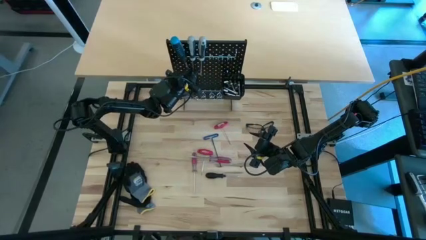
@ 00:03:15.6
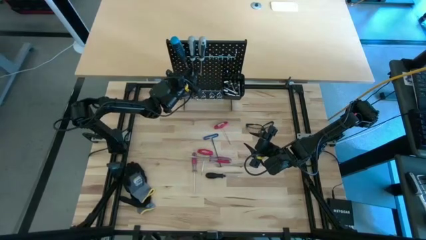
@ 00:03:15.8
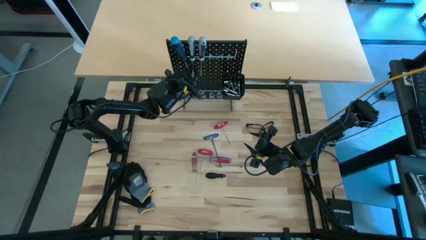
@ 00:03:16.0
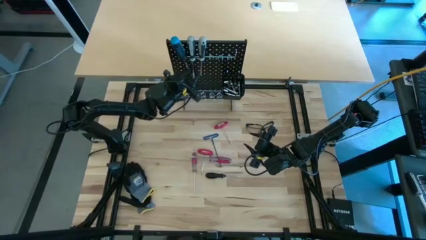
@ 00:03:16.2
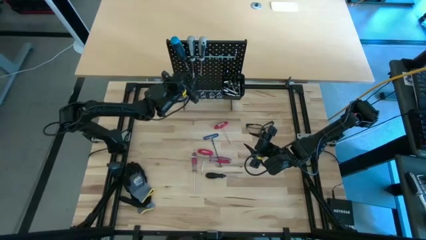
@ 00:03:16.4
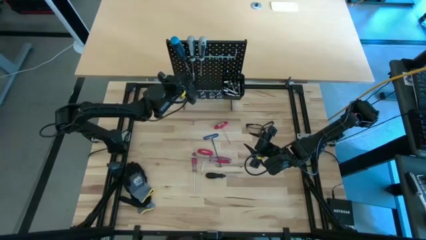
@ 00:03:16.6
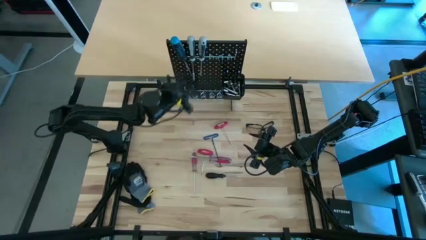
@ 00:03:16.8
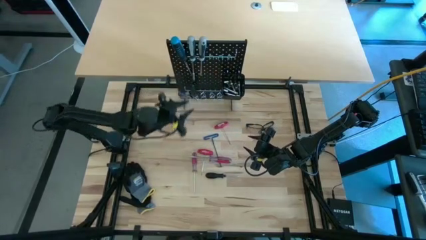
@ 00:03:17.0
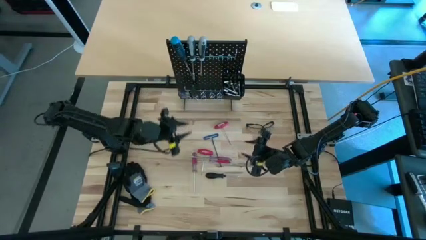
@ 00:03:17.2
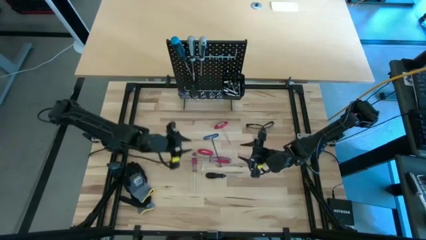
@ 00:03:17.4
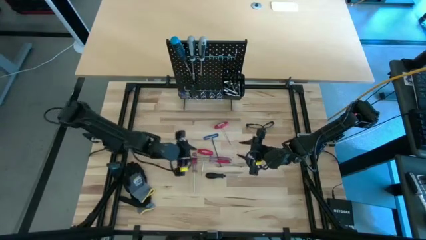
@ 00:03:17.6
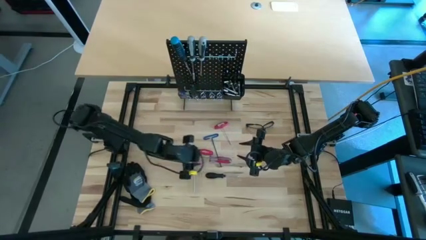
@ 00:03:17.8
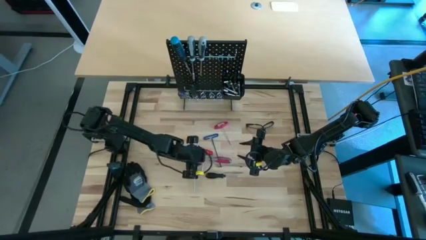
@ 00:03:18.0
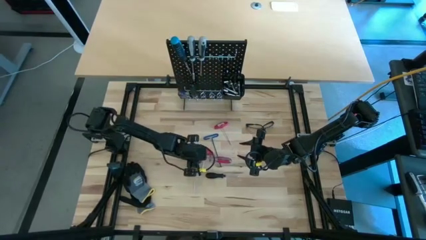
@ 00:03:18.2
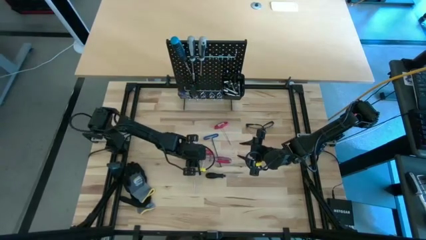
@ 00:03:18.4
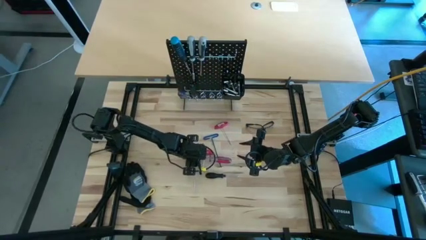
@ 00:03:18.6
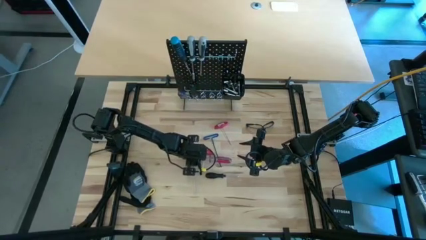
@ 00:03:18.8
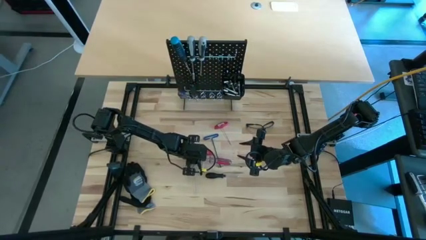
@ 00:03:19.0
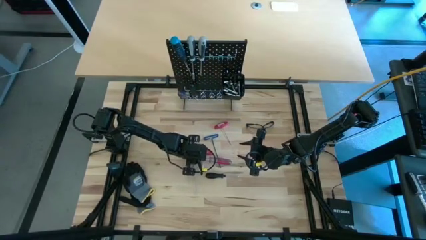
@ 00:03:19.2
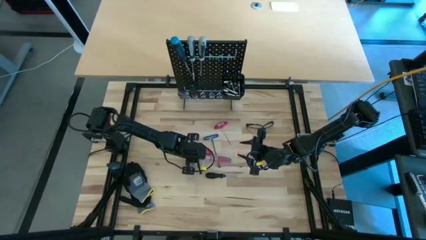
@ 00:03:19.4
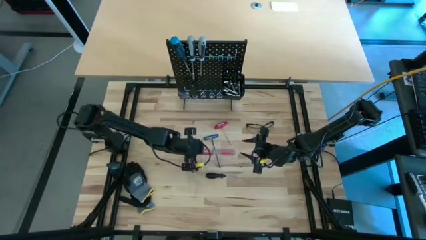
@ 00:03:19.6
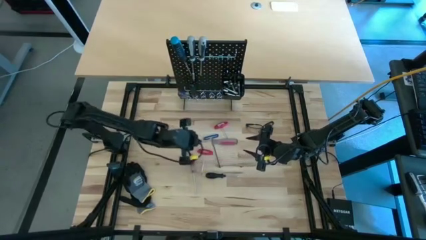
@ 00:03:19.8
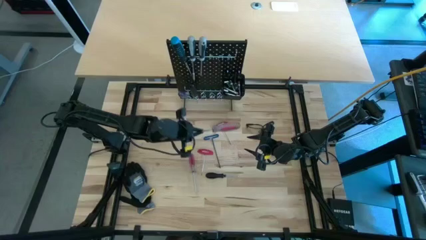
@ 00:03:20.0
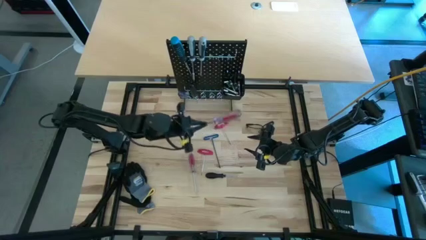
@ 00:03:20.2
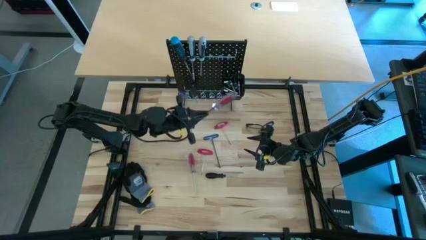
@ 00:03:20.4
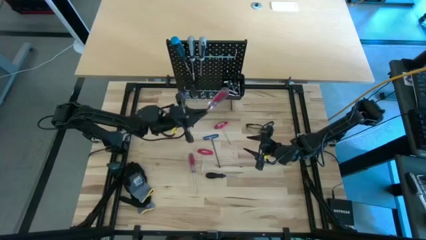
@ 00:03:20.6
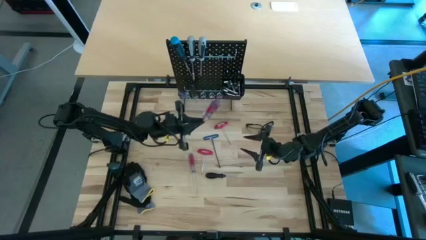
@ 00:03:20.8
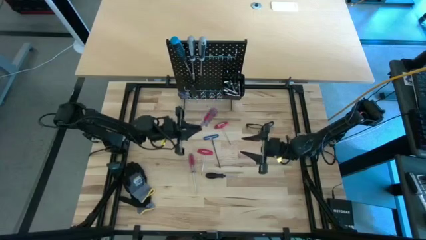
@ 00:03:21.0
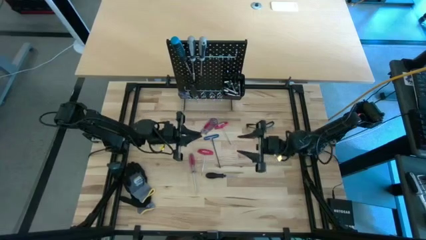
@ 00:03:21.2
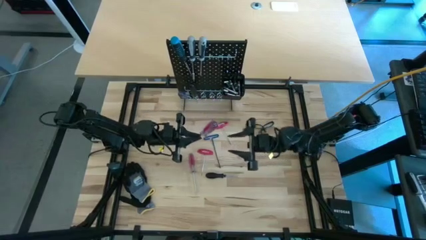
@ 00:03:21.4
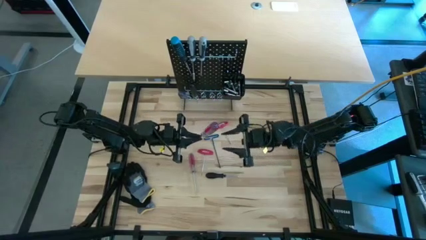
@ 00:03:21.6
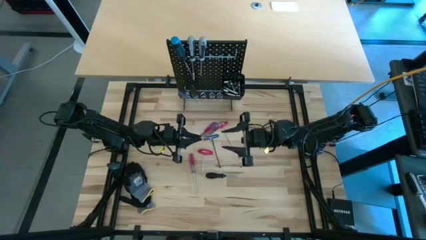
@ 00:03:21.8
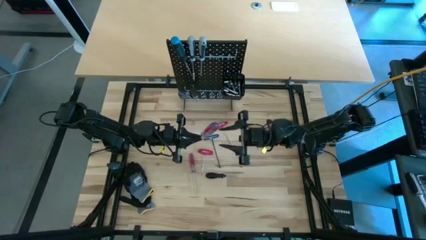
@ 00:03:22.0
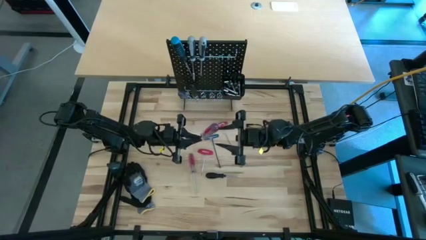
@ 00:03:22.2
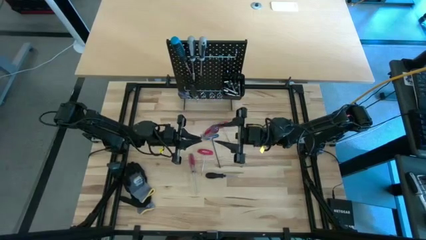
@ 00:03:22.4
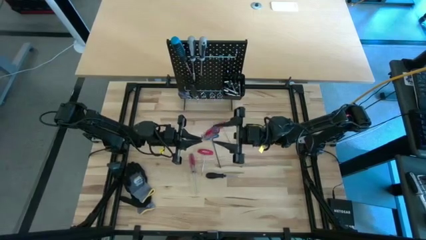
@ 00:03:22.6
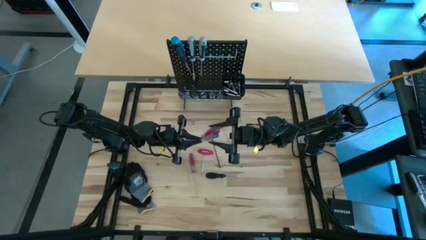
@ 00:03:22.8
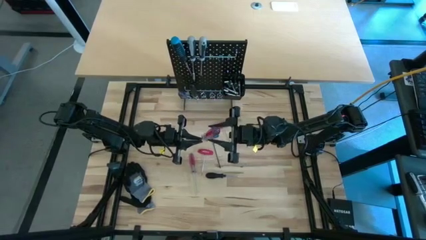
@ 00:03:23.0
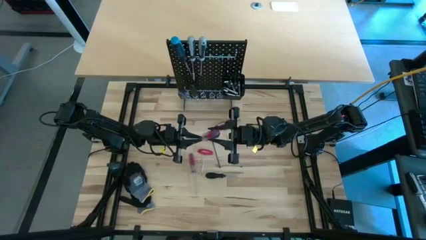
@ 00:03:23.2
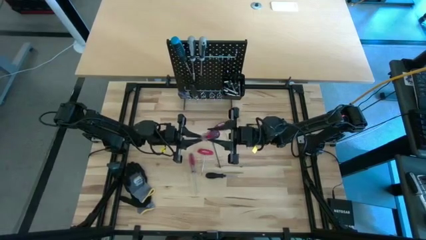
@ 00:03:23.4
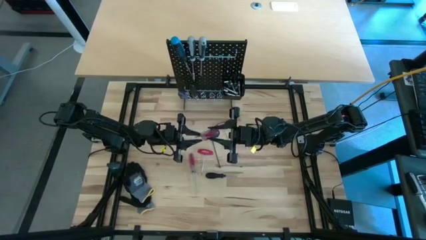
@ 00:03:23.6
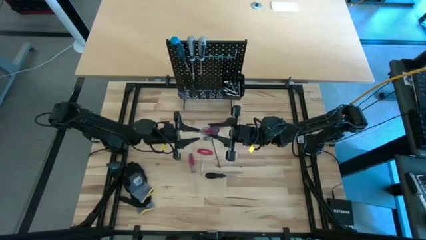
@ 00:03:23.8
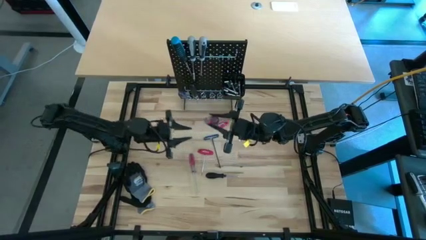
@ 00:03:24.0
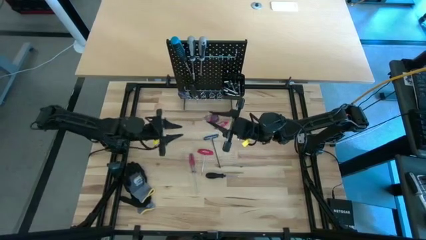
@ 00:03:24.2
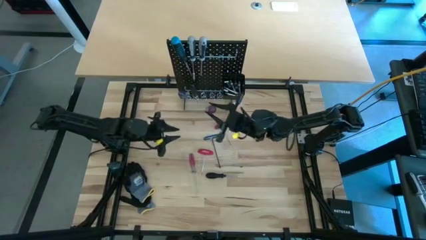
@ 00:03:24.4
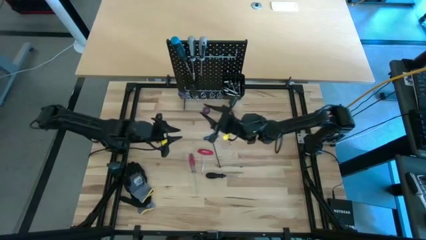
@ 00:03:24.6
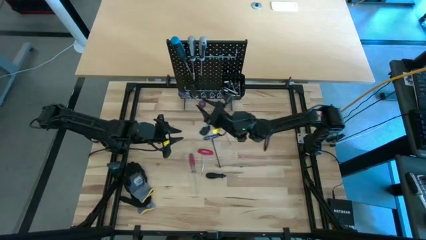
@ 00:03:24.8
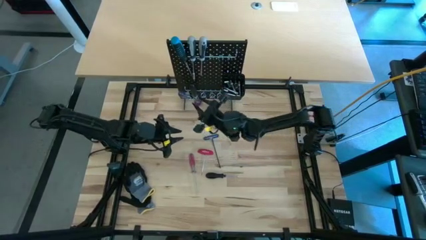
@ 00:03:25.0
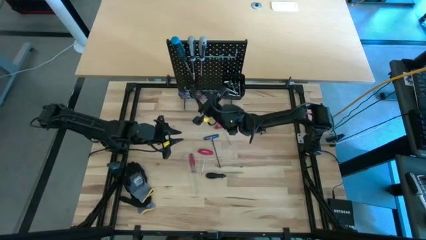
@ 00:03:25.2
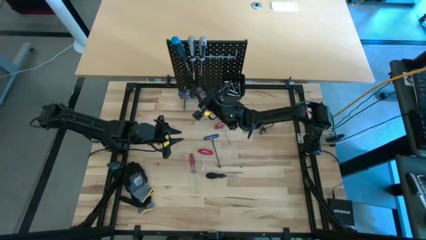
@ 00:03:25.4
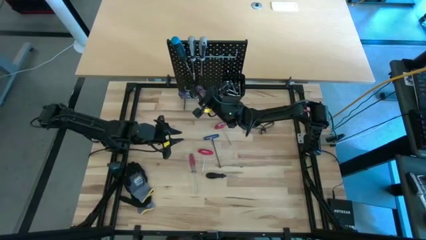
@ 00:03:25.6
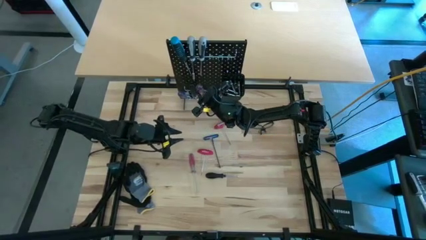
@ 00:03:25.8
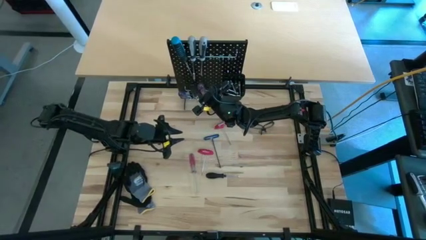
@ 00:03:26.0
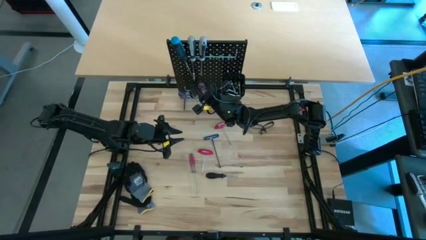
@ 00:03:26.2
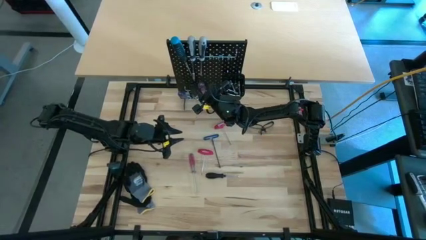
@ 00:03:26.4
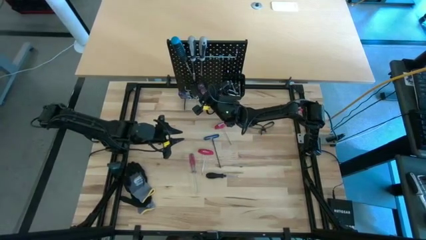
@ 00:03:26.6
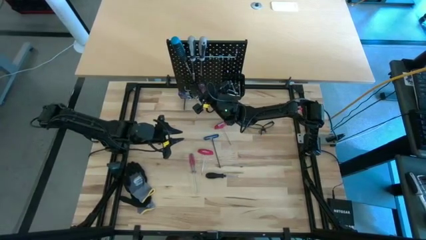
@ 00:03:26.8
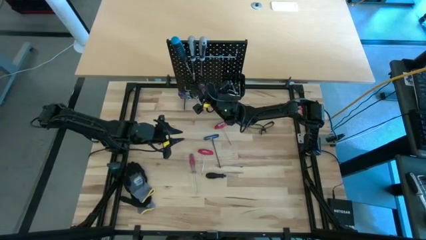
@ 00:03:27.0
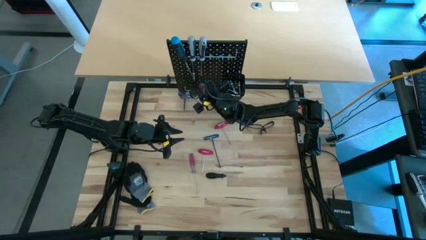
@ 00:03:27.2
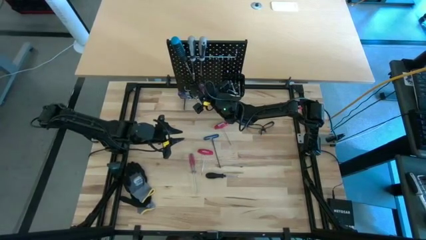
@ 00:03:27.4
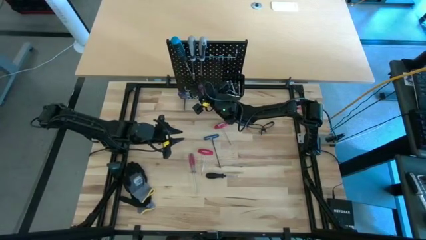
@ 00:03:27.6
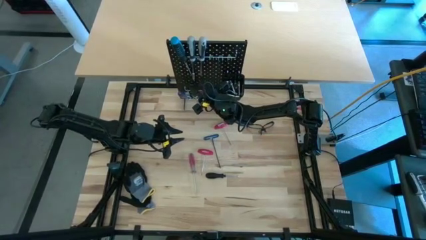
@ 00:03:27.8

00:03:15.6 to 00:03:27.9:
Task: Hang tools onto peg board
Hang the red screwdriver on the peg board
